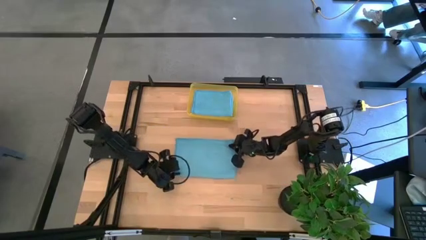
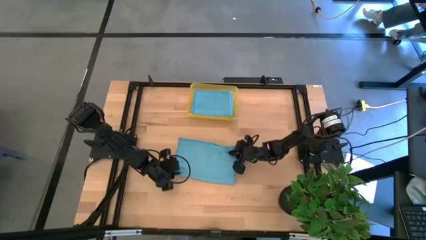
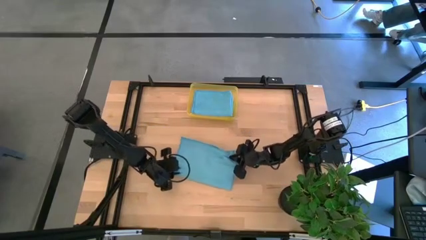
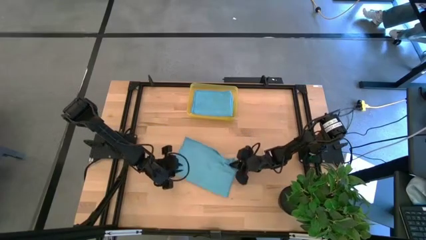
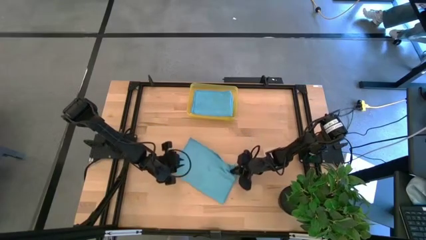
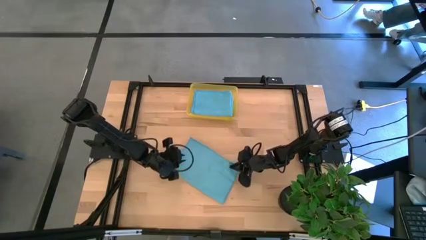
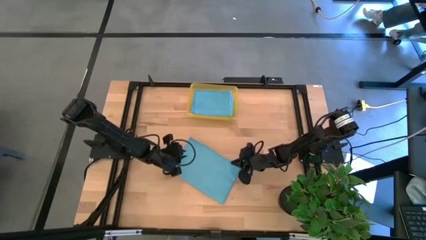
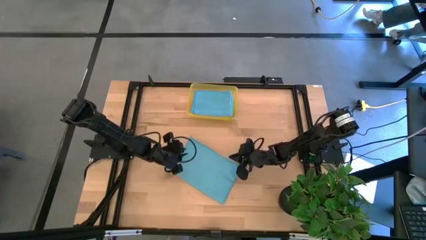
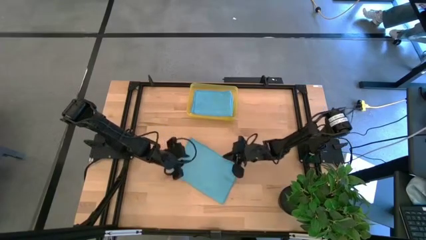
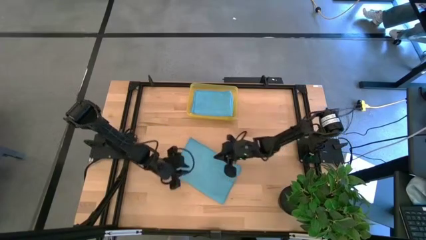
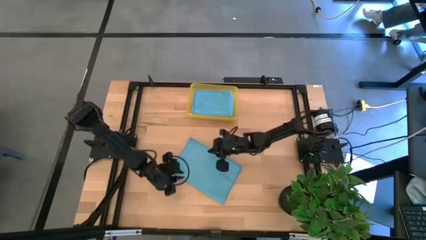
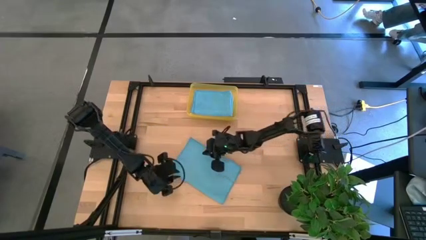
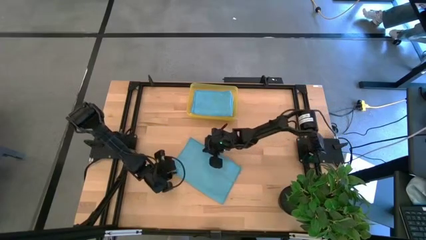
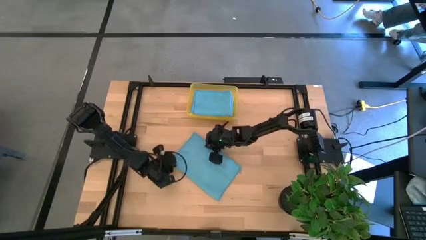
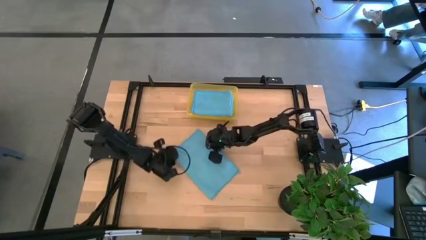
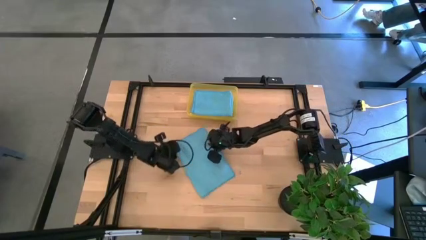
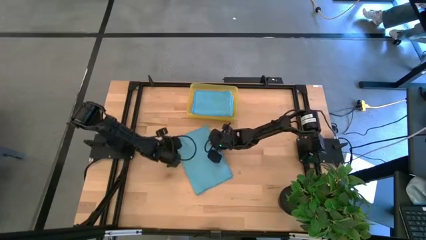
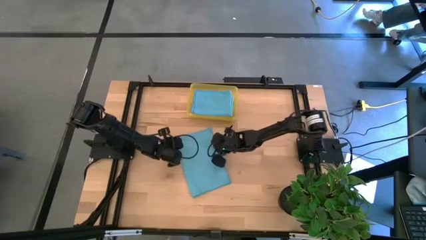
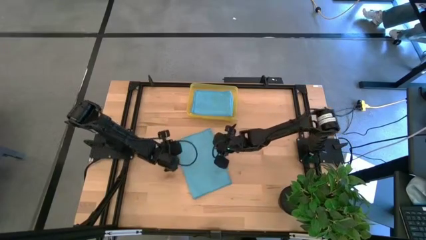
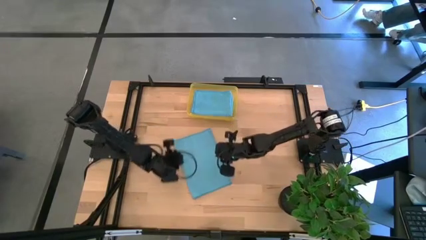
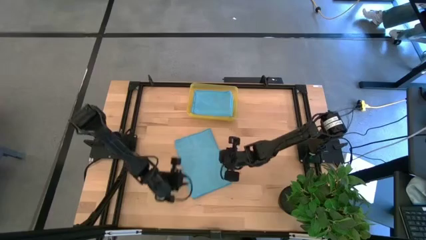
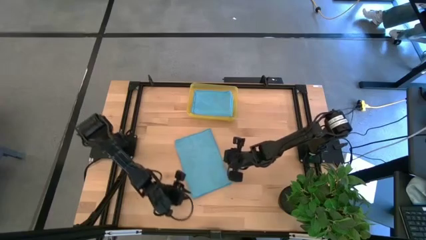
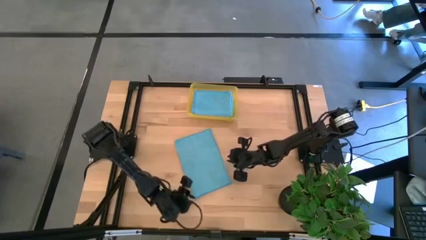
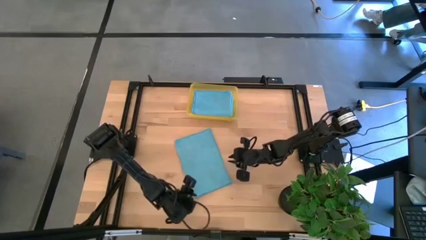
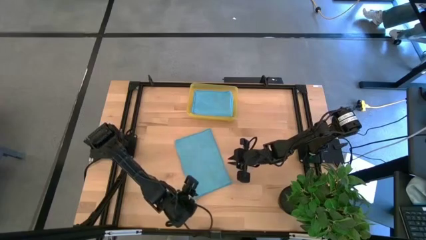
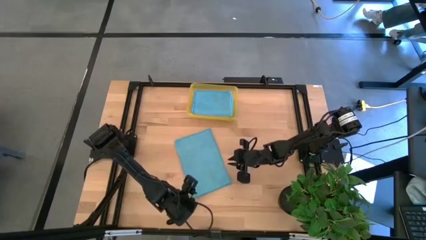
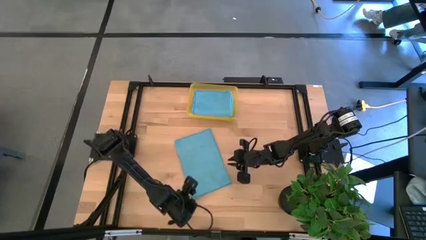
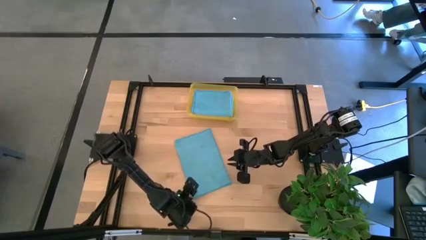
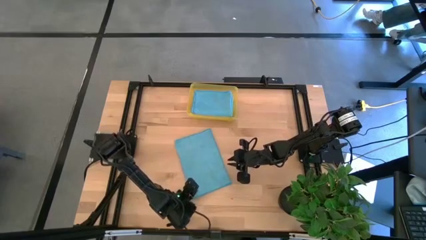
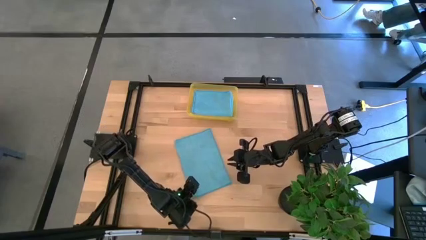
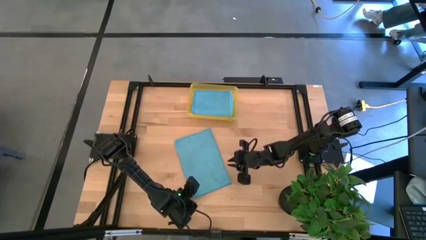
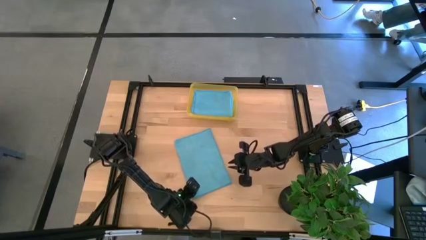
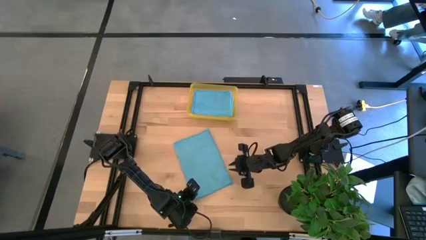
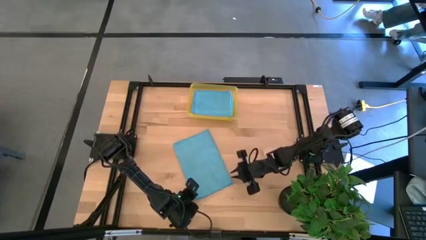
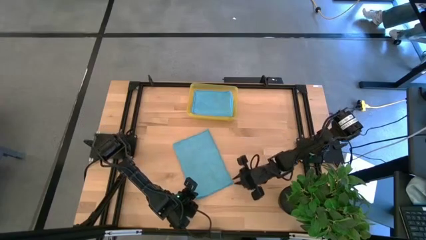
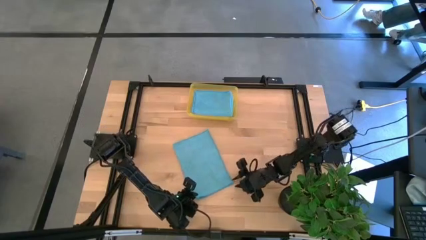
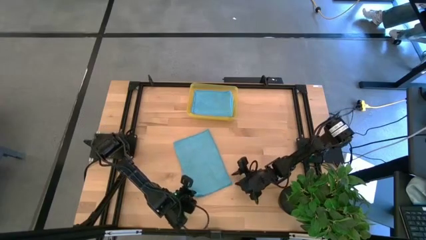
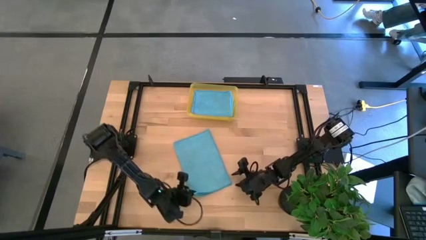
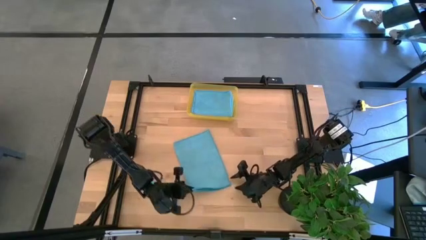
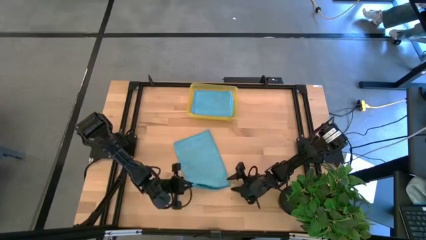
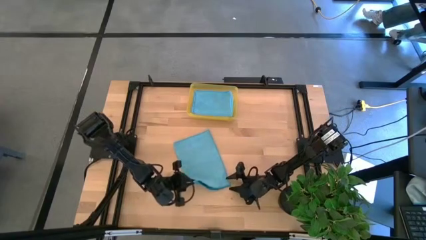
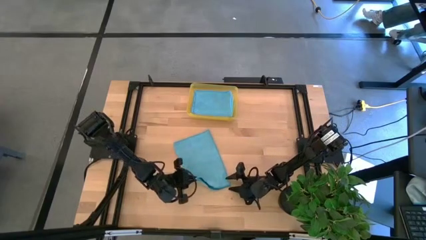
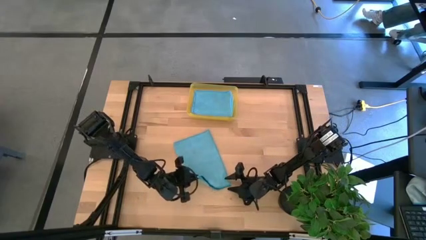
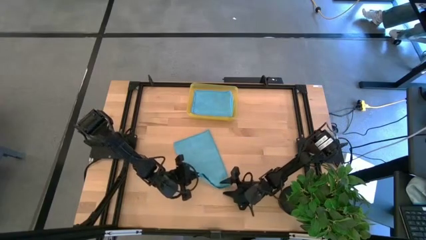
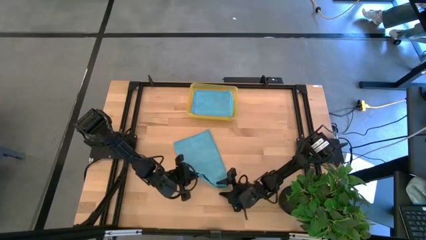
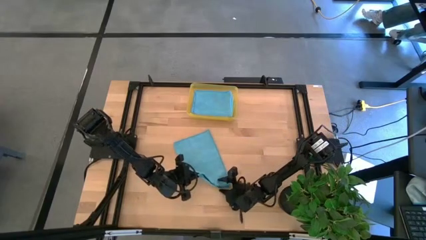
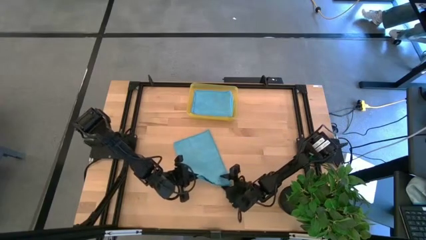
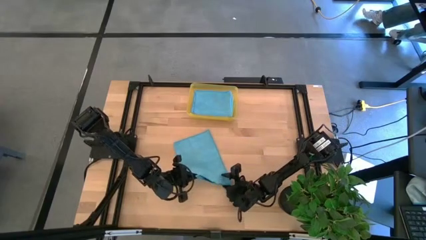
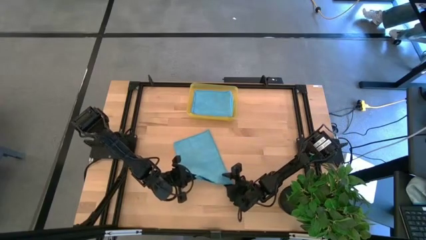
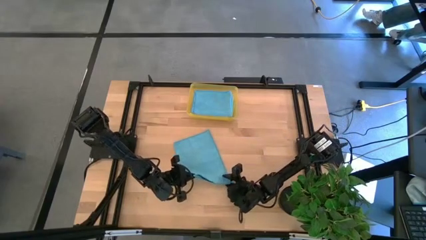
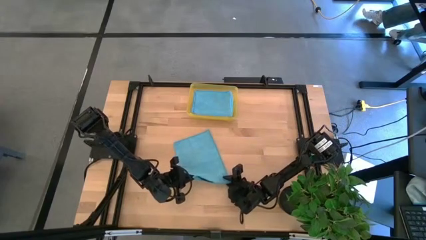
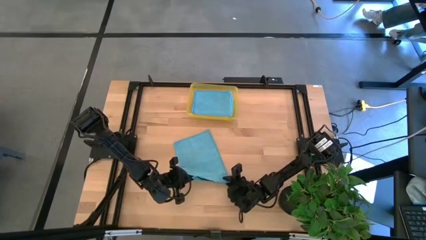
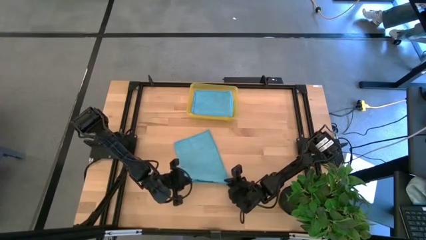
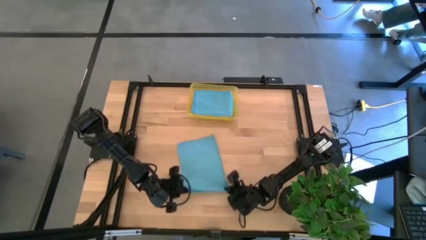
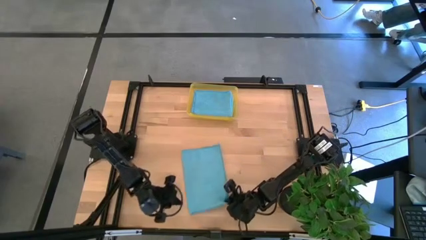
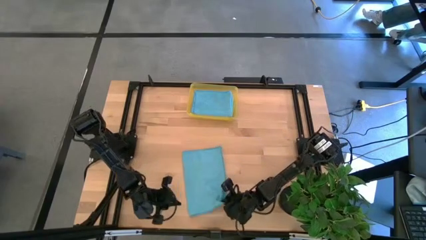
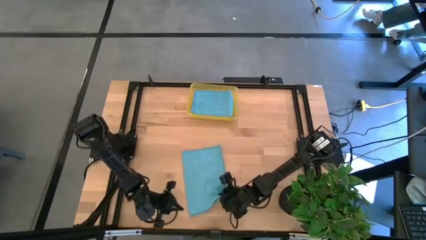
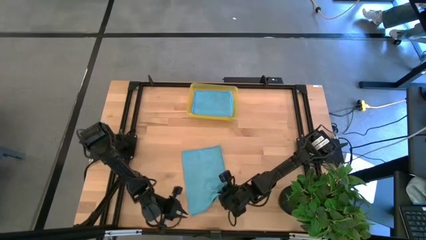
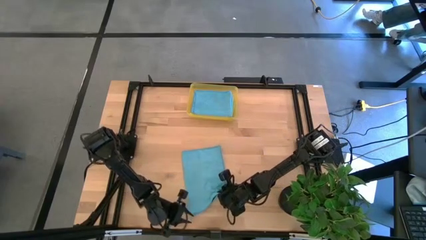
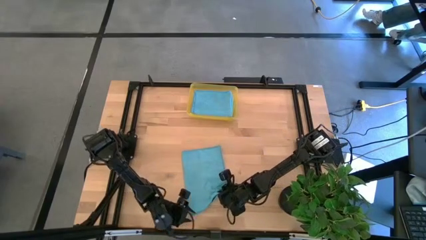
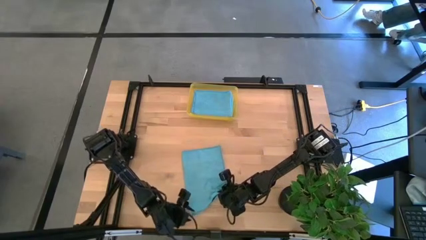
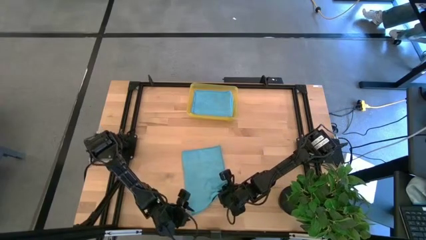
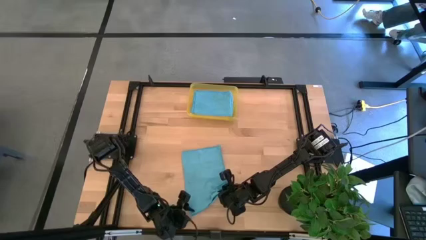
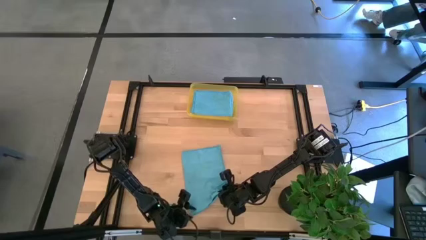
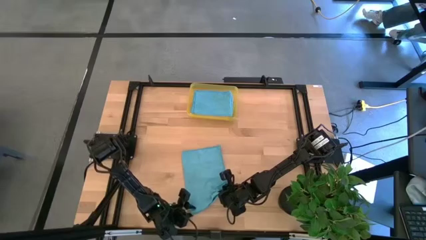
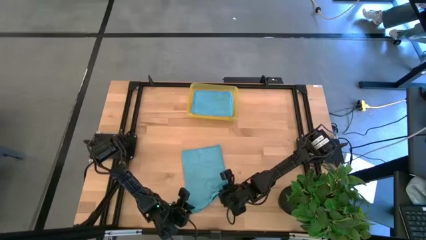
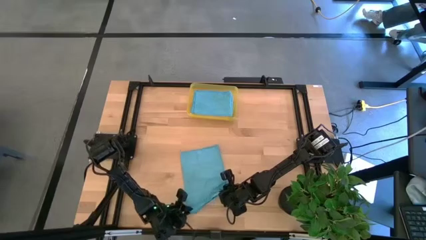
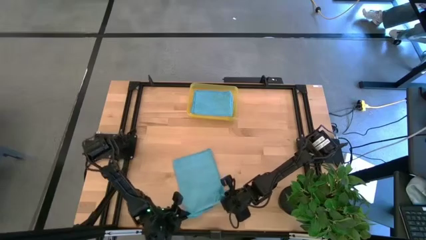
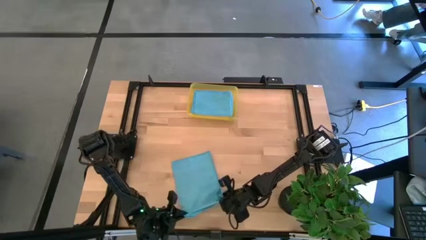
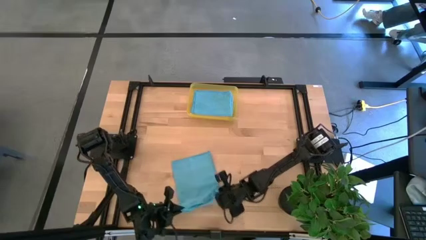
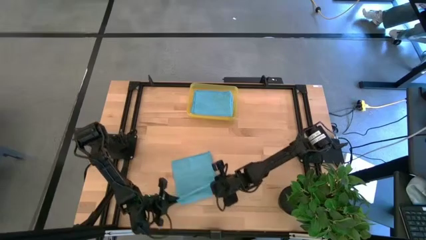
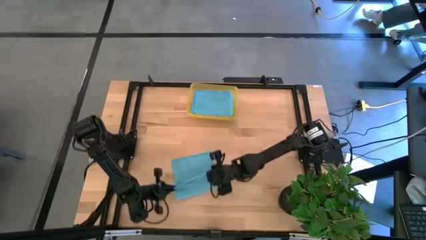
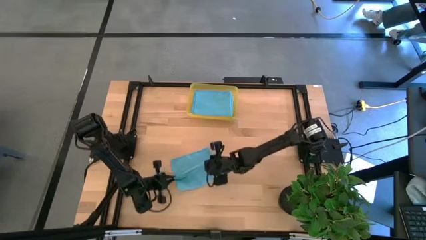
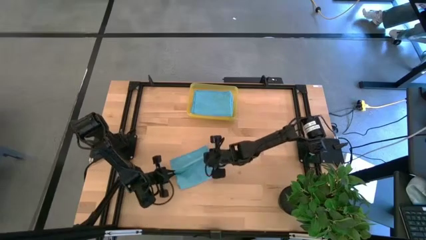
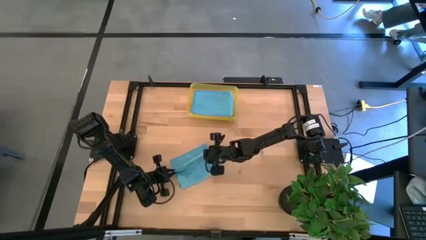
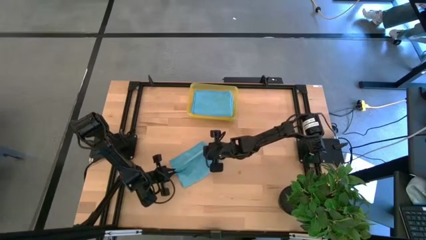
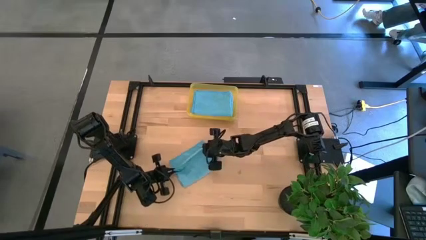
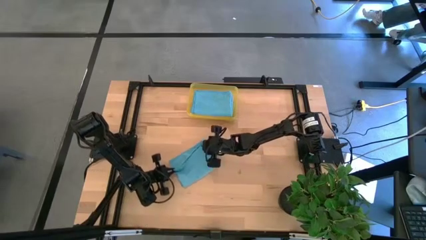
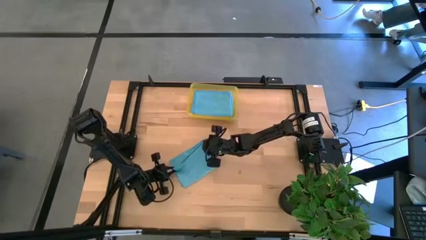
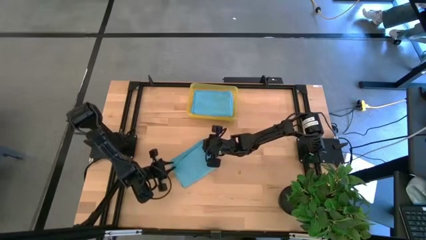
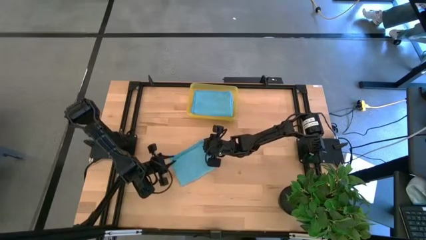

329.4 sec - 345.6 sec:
Task: Fold microfiber towels
Fold the blue towel
